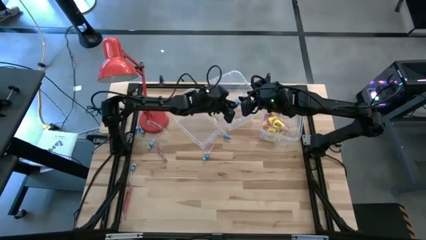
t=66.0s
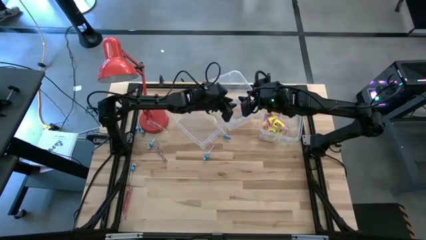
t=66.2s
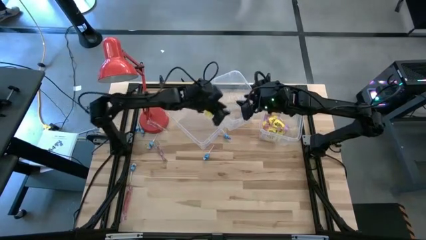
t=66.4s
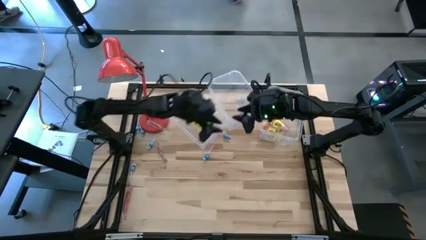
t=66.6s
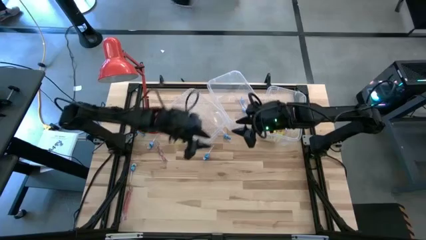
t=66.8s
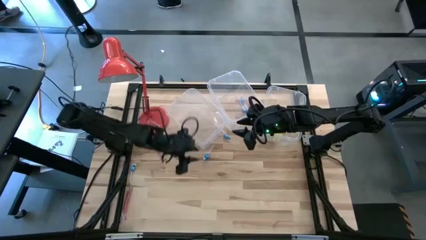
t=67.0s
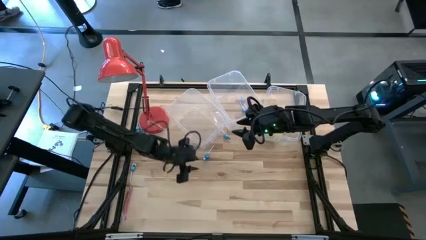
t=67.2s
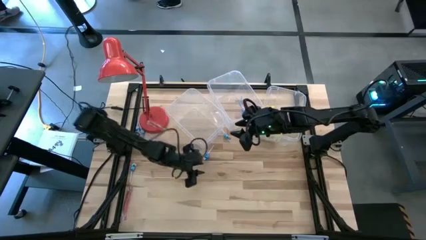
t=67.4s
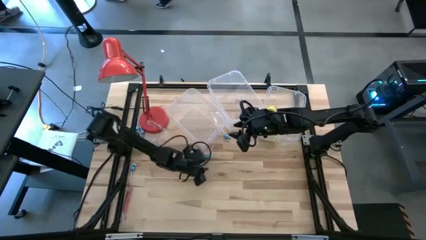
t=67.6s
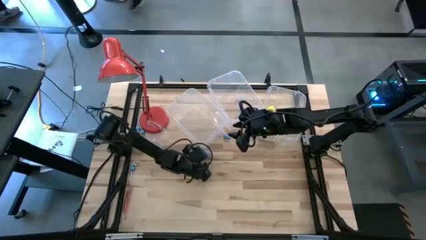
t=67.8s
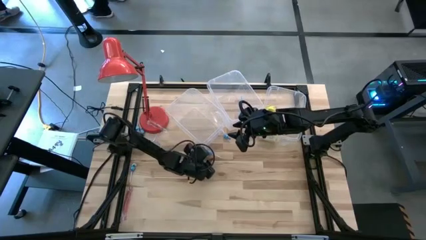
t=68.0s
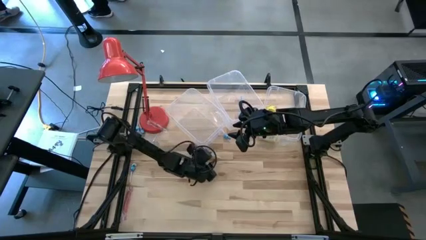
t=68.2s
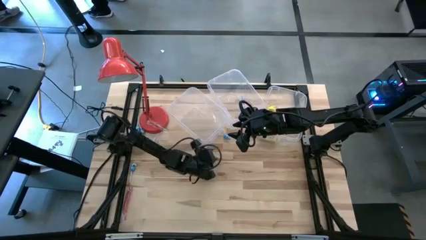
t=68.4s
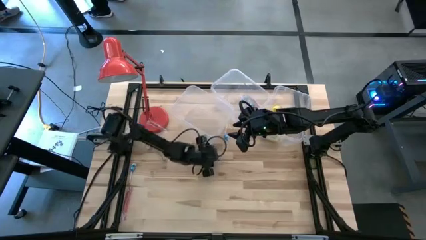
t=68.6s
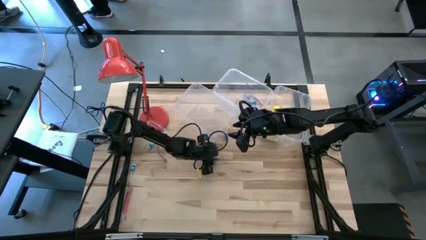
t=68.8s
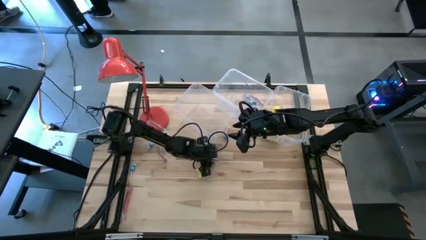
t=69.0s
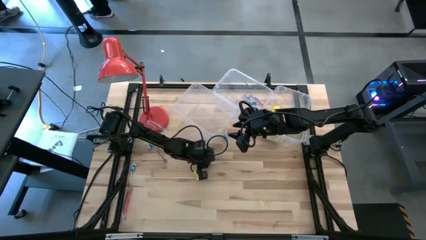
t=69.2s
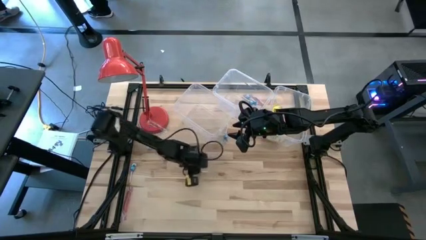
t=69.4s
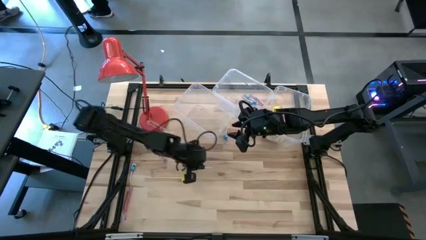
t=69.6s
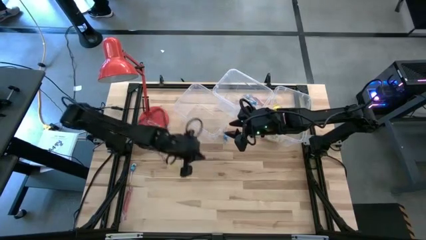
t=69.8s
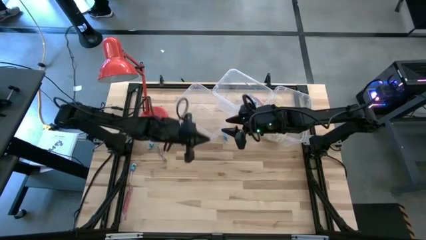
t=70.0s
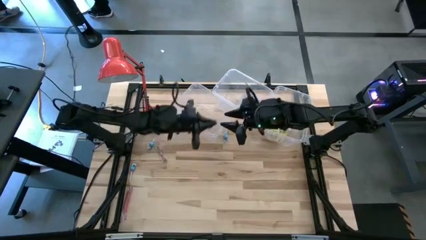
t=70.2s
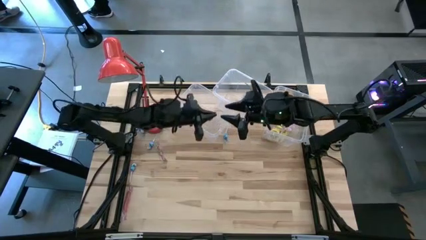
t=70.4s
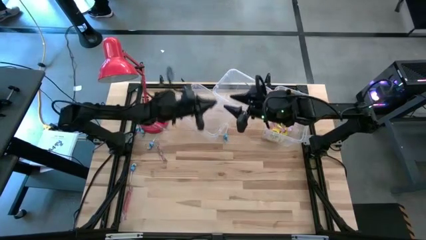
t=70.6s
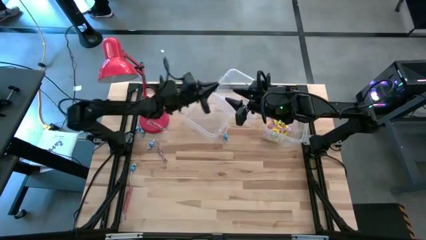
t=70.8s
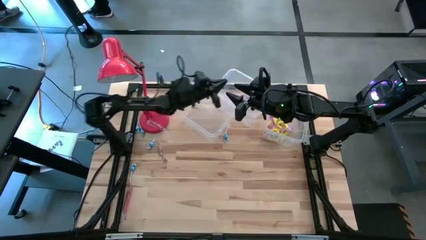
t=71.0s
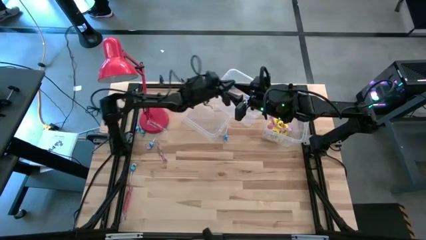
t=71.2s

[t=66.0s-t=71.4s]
Task: Sort candy
Put the blue candy into the center transparent bin

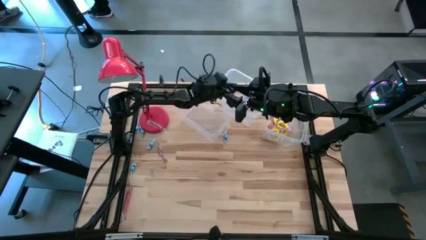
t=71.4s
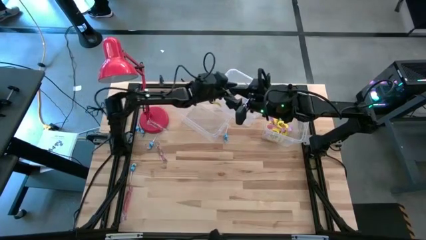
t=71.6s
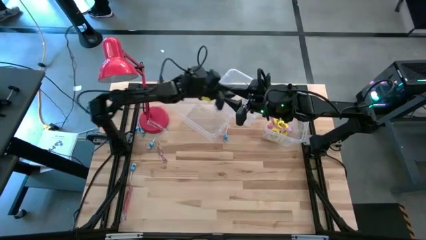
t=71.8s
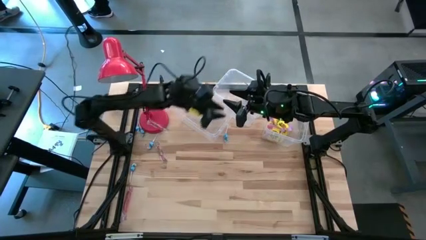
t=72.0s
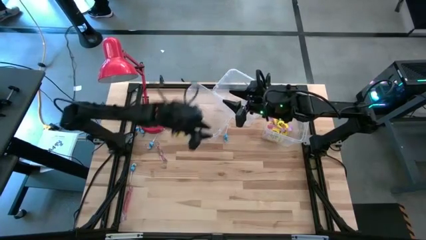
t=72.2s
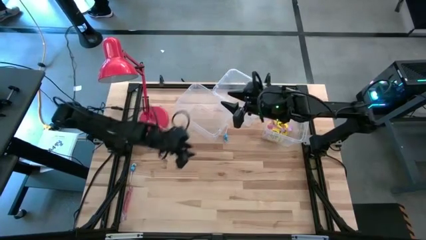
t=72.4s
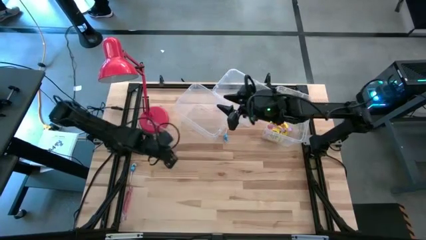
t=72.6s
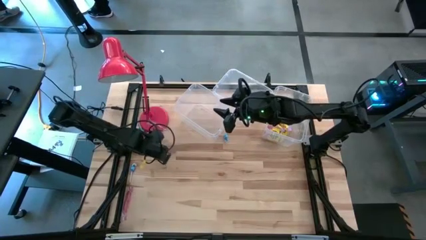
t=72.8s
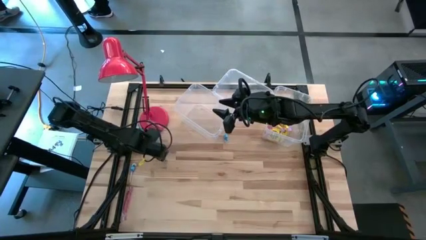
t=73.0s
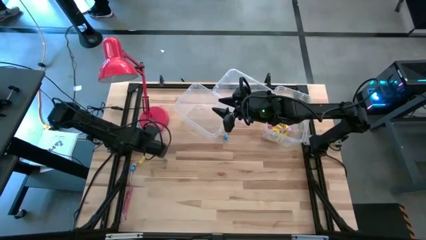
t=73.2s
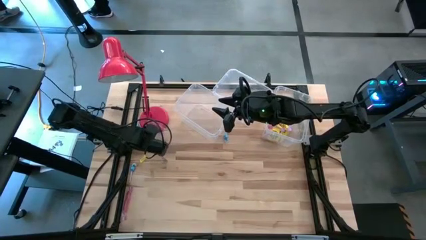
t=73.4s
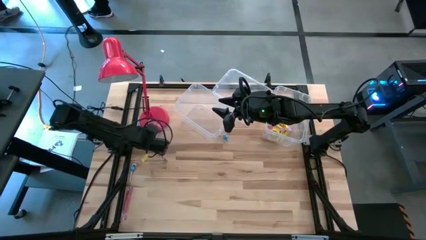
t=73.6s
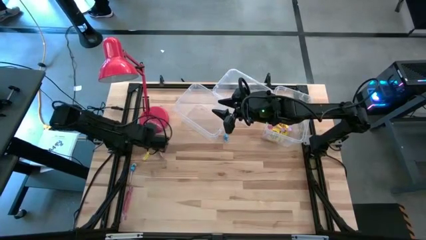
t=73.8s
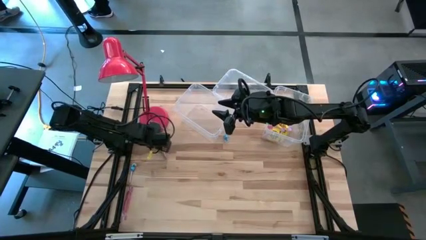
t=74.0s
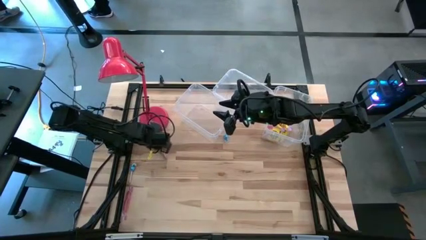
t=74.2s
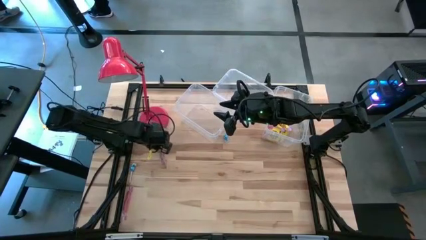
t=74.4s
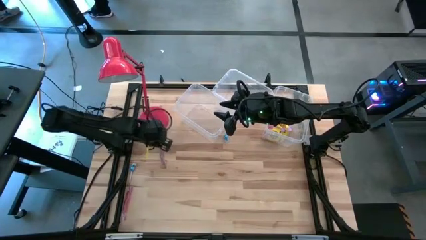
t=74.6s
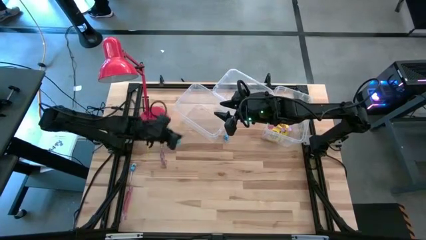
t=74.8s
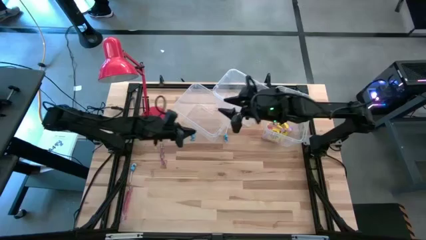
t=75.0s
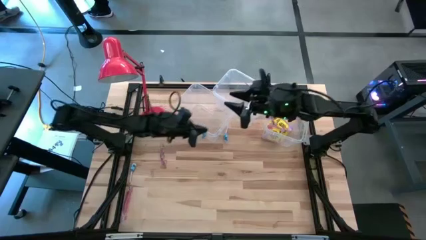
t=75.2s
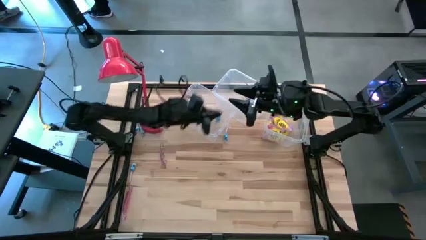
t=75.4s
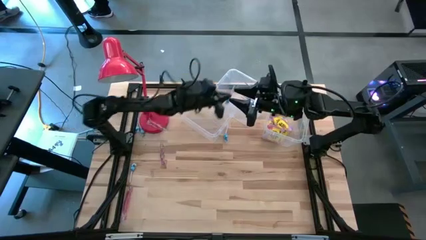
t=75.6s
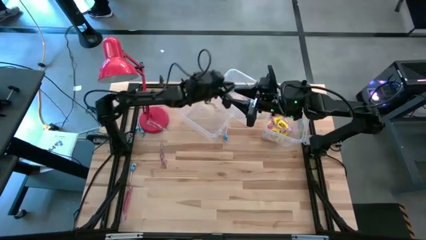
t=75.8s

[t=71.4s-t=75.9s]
Put the blue candy into the center transparent bin

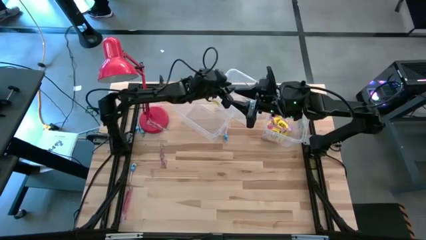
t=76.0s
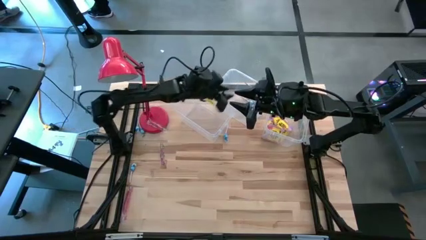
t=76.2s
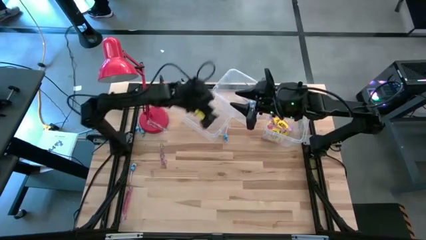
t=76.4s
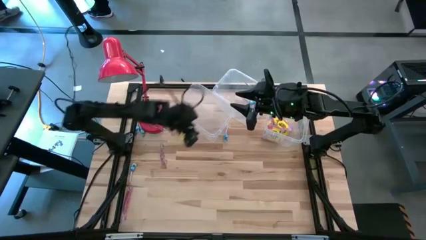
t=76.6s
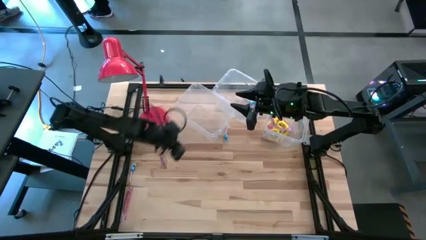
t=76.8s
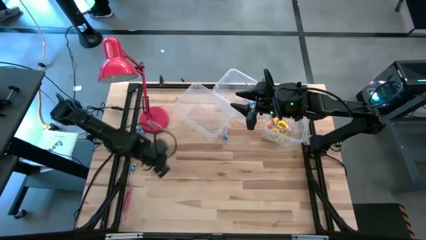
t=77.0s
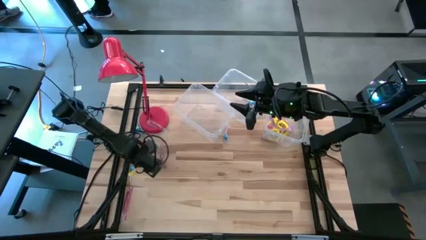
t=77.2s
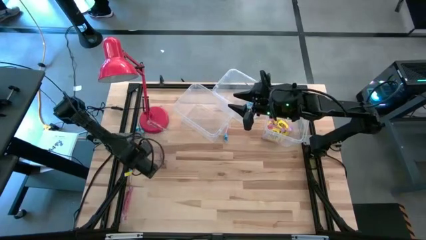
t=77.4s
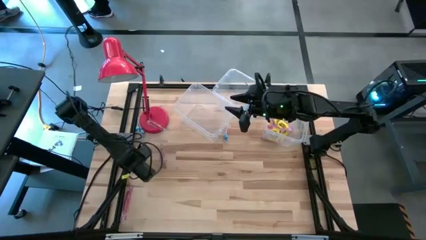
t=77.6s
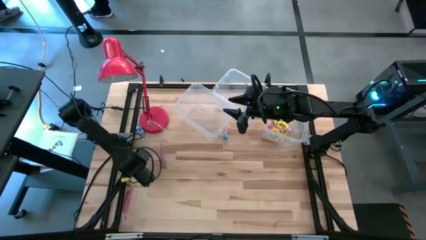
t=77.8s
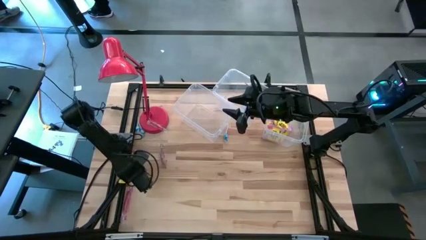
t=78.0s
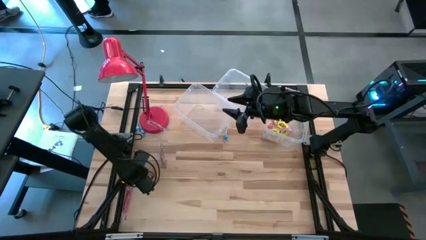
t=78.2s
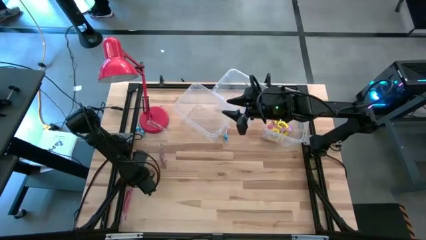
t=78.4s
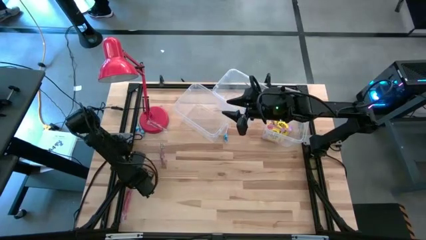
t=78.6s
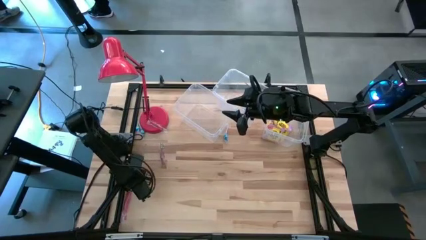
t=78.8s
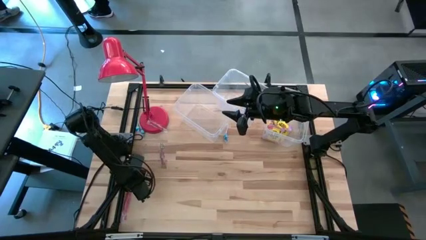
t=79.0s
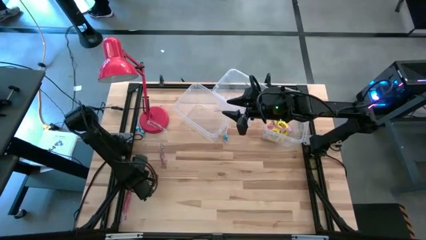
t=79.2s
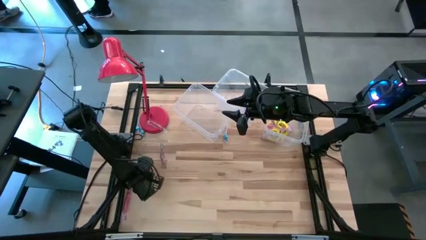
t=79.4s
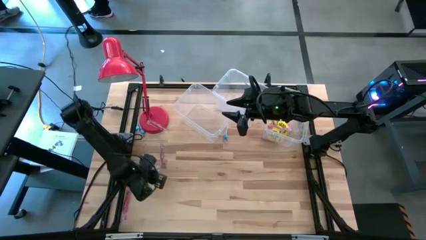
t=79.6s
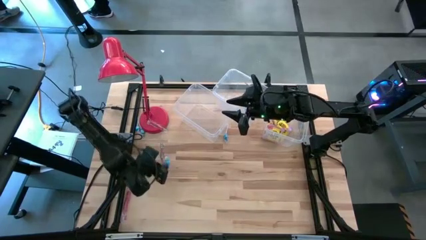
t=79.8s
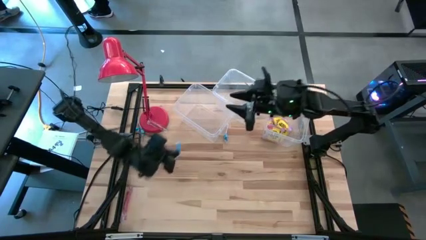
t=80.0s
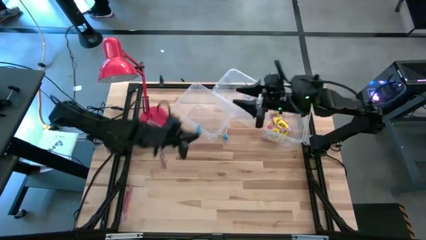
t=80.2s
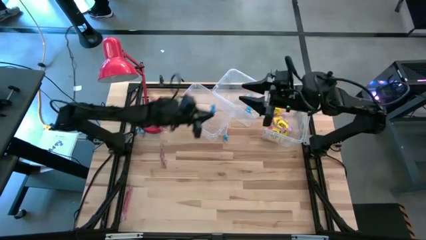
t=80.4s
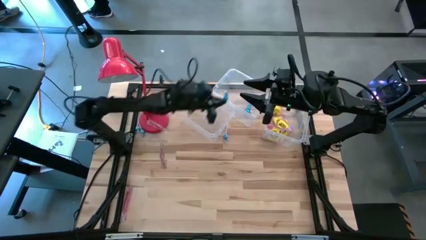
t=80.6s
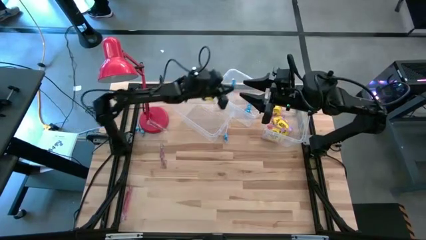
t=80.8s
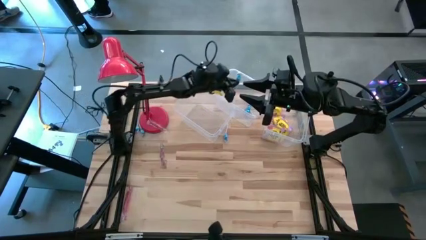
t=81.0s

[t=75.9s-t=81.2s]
Put the blue candy into the center transparent bin

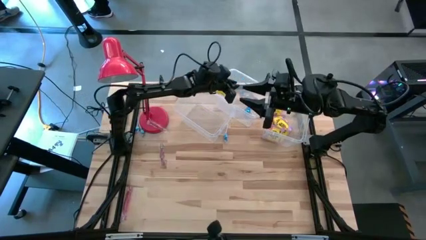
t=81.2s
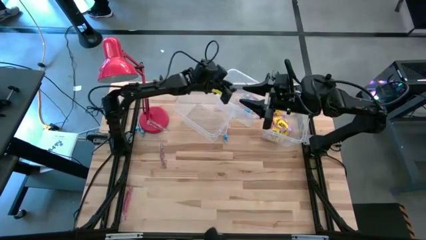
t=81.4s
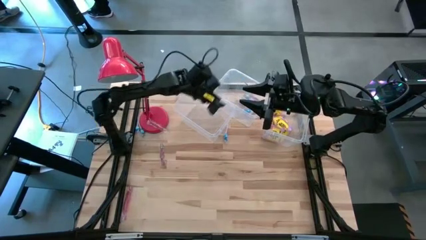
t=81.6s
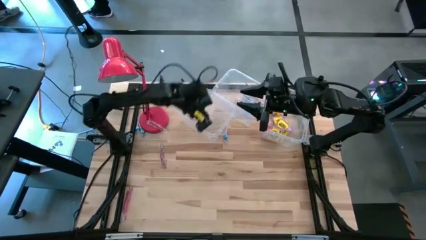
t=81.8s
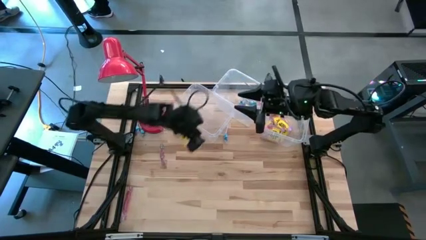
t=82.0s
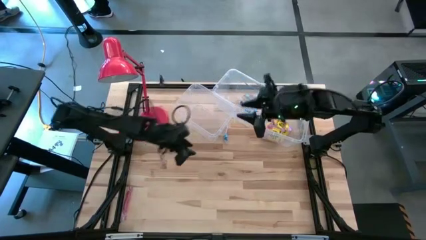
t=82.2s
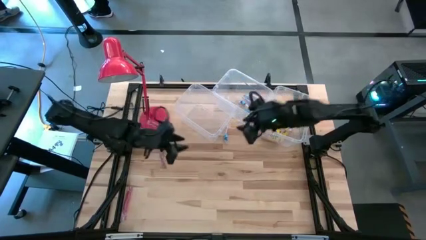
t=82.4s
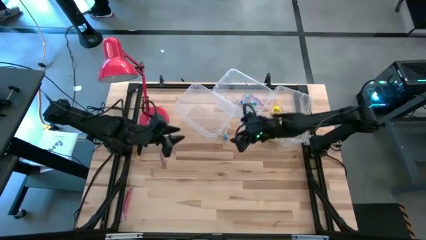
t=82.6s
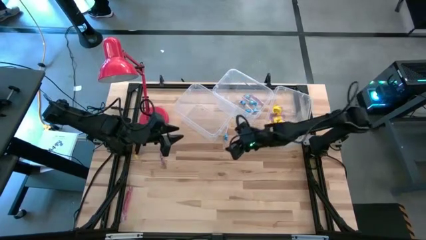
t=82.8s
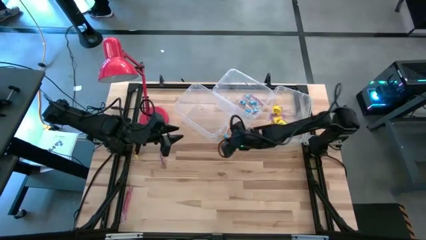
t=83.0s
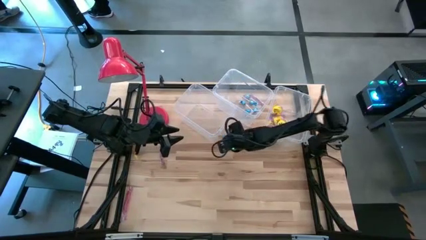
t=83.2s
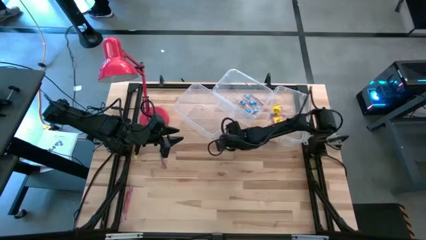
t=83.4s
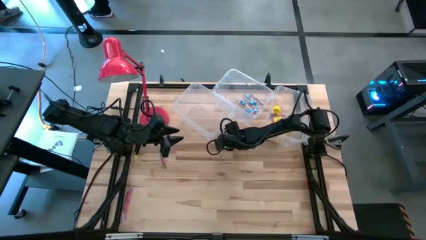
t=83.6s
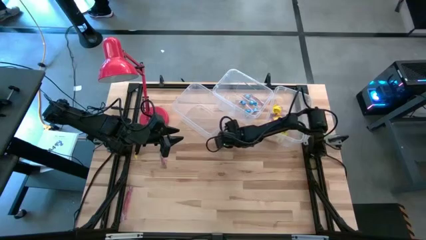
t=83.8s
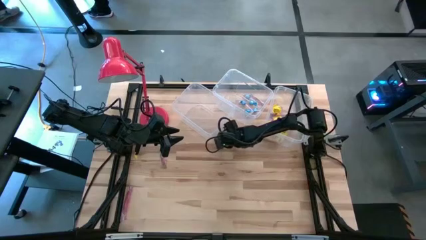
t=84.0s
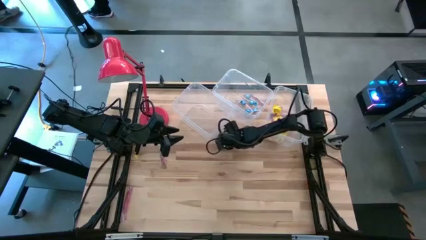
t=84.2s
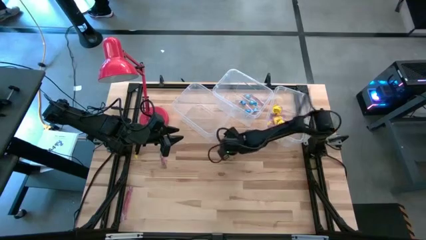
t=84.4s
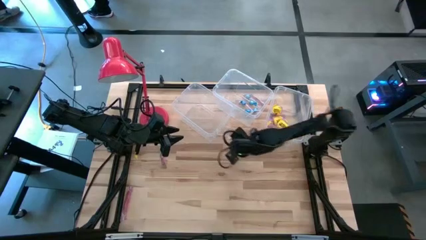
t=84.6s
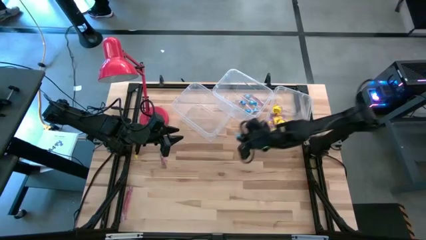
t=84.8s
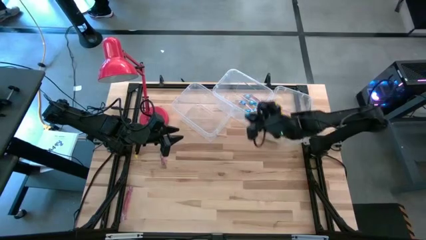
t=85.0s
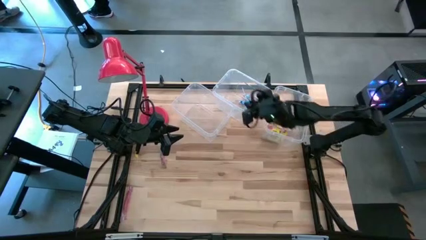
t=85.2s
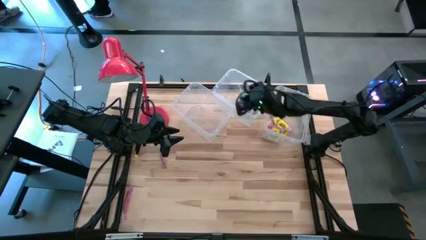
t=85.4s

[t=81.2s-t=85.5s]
Put the blue candy into the center transparent bin
